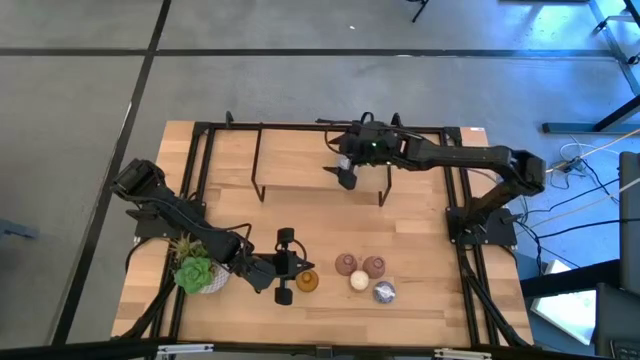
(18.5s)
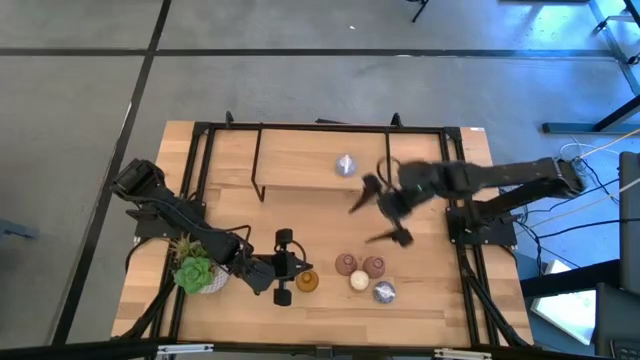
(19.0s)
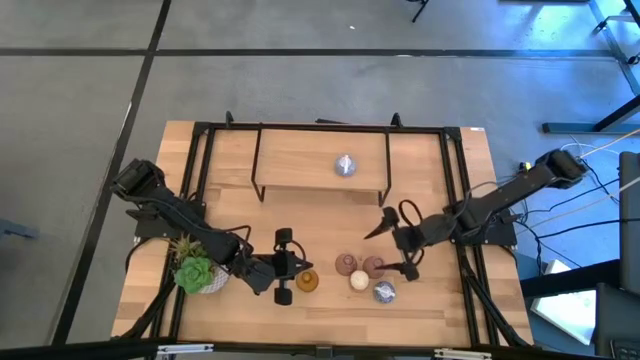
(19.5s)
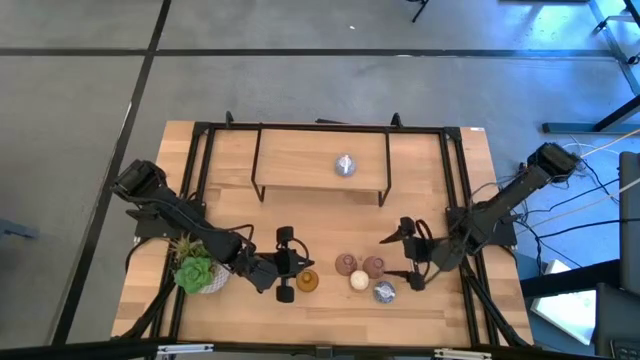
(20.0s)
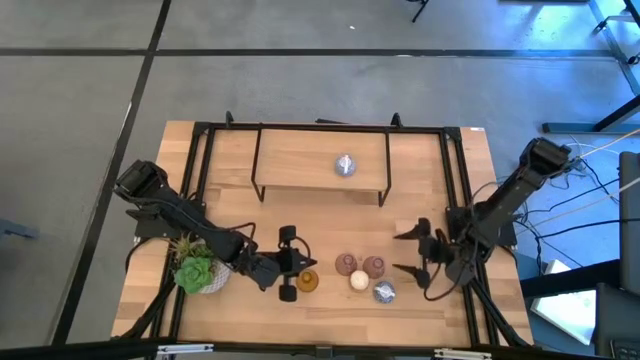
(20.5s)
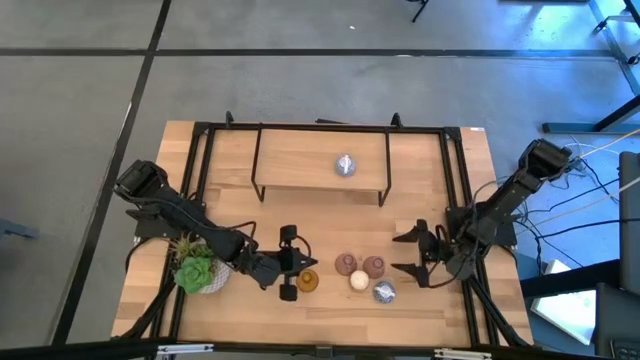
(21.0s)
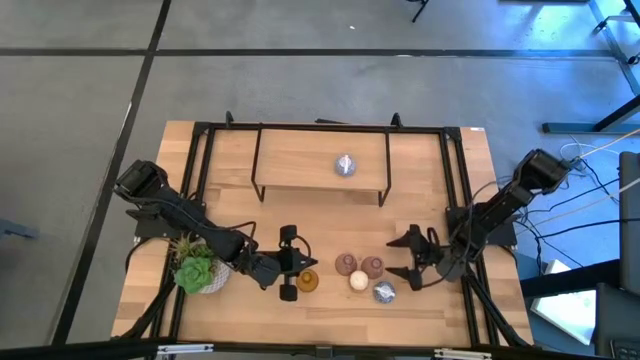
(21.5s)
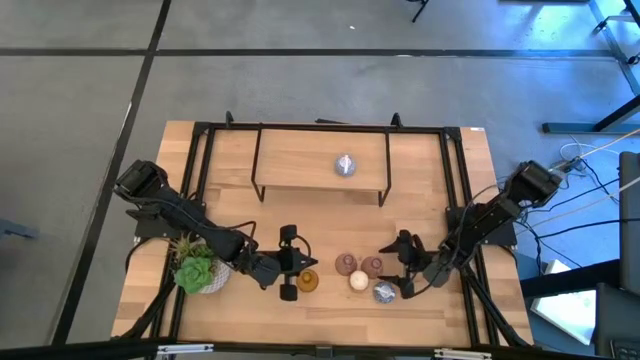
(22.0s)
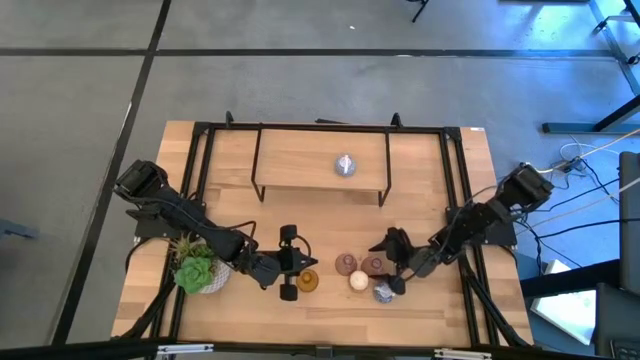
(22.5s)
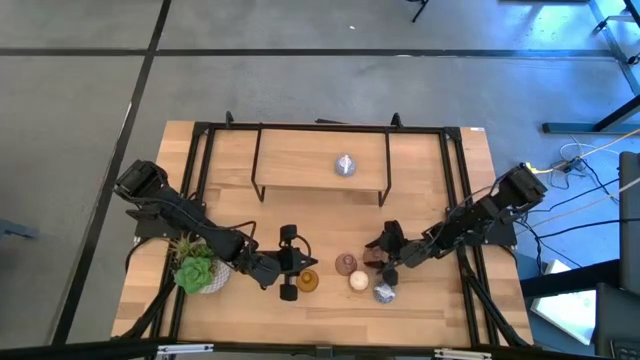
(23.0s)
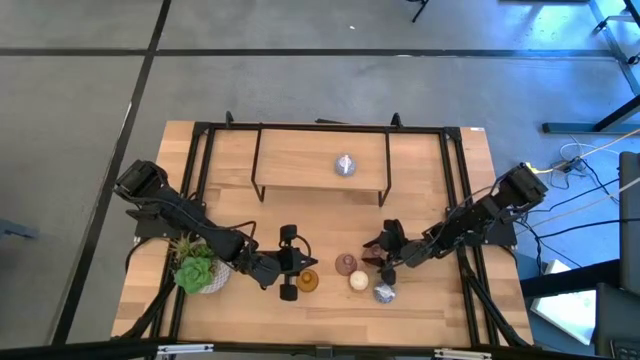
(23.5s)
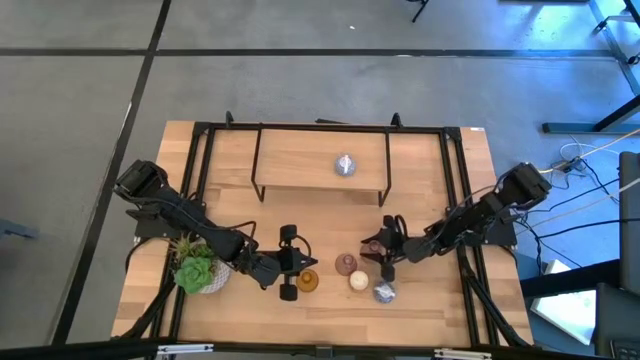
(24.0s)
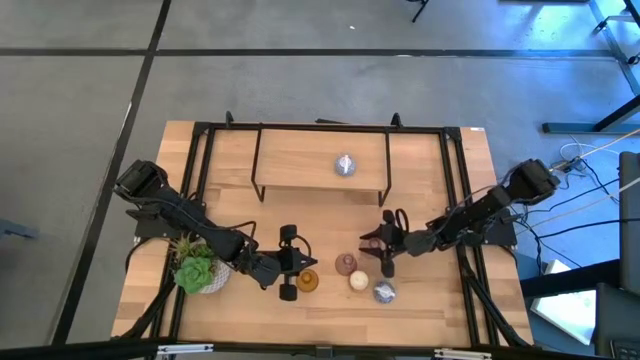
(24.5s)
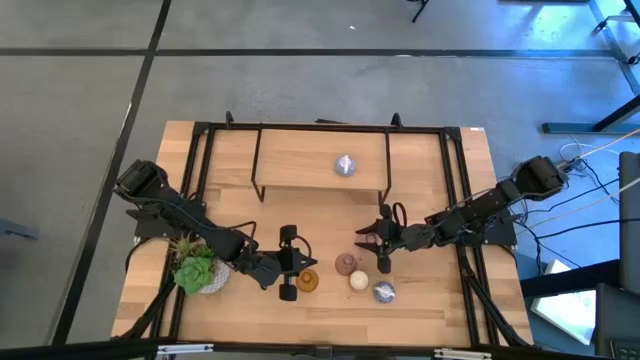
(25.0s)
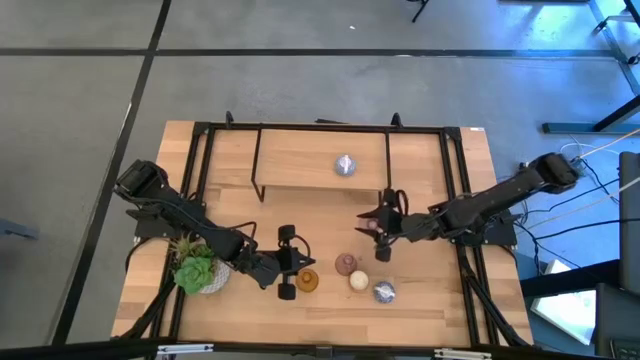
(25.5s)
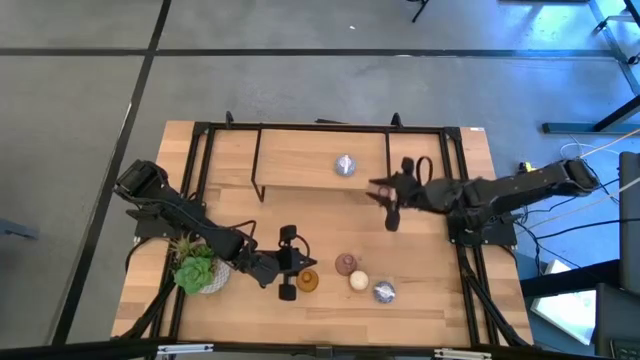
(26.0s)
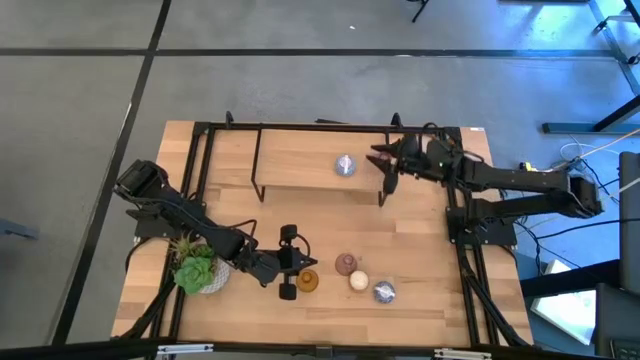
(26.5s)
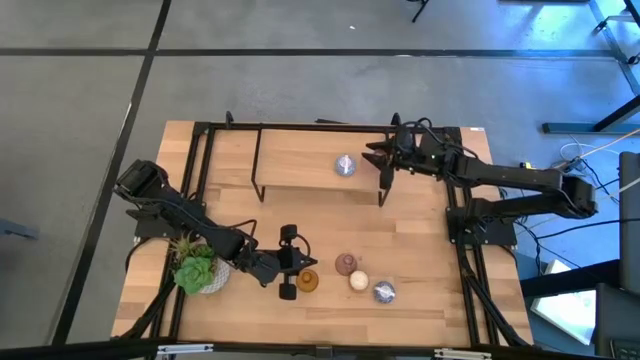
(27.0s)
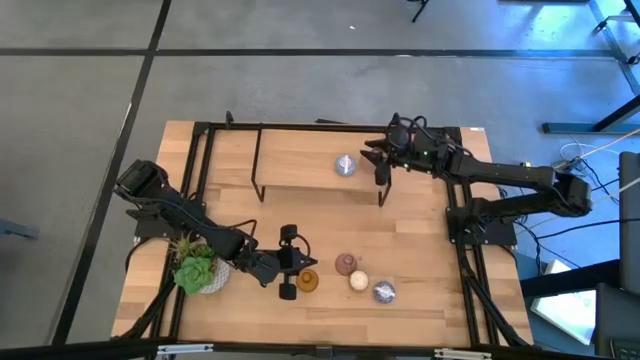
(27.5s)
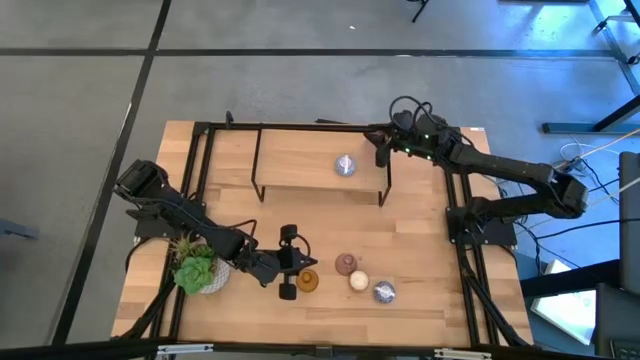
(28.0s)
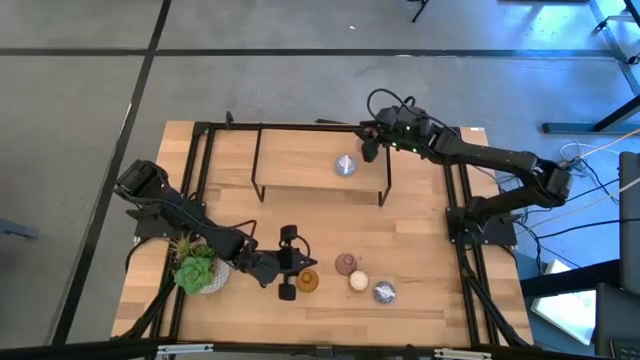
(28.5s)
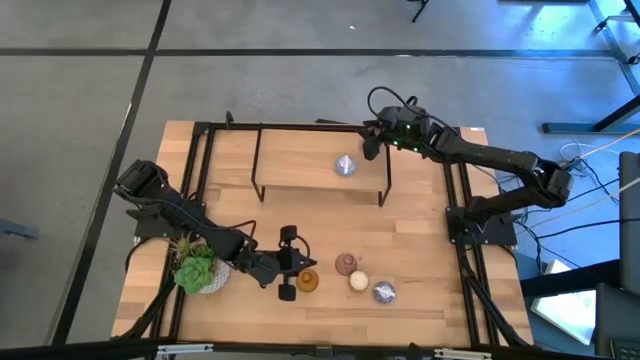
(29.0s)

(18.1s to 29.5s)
Task: Pick & Place candle stick holders
Put the right pink glass candle holder on the shelf

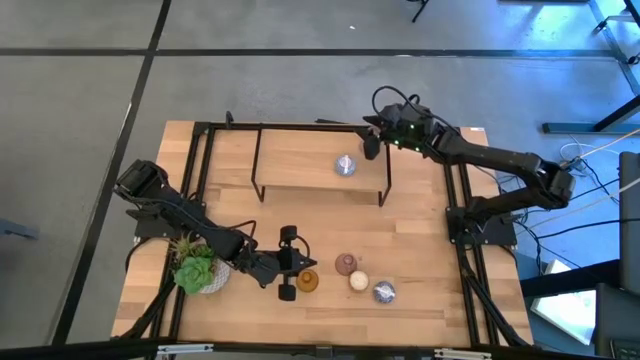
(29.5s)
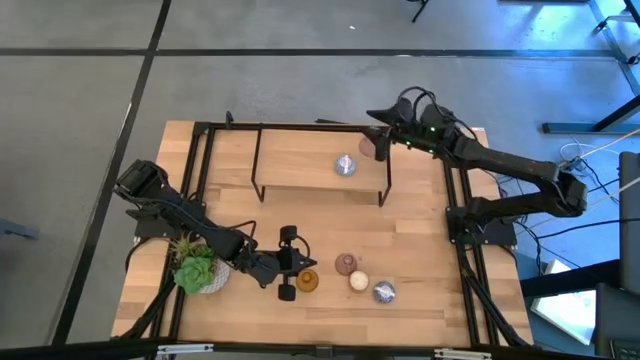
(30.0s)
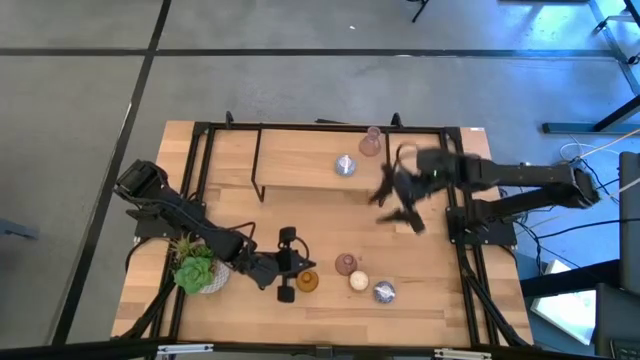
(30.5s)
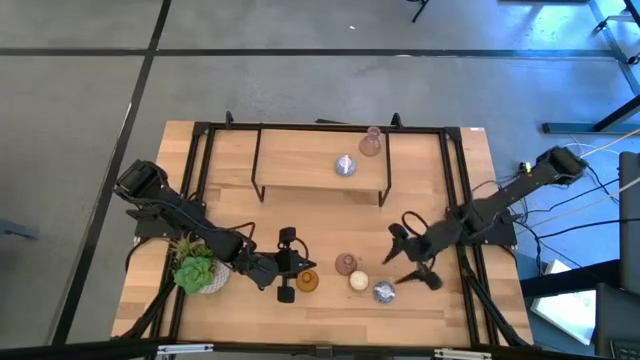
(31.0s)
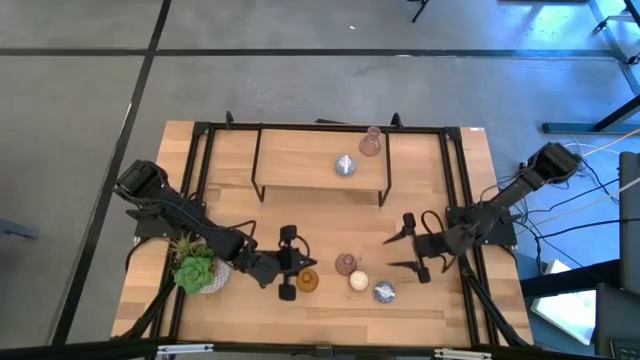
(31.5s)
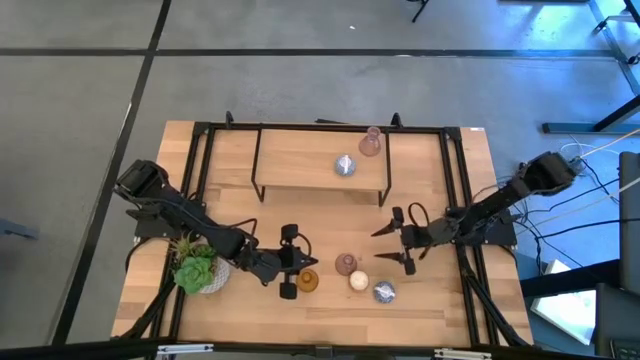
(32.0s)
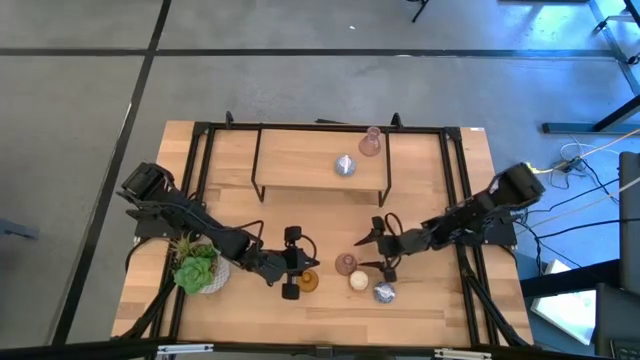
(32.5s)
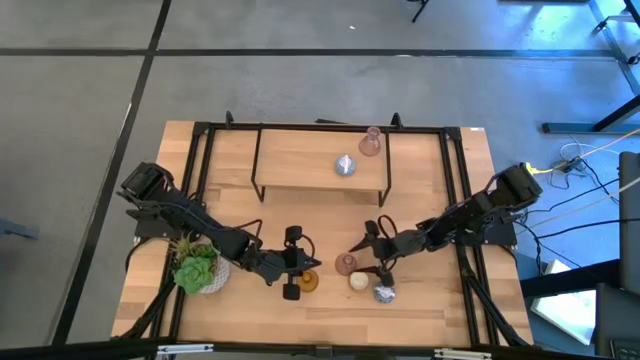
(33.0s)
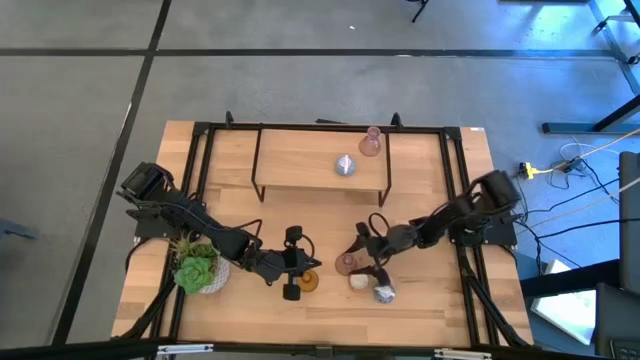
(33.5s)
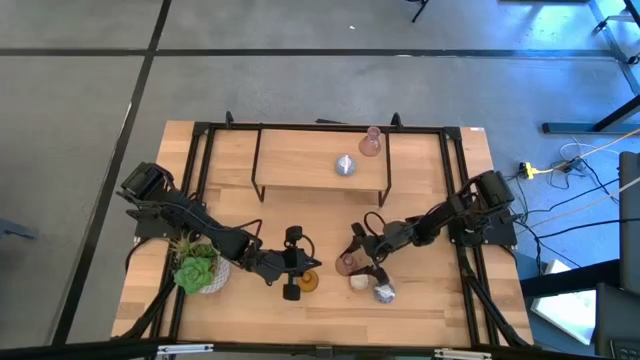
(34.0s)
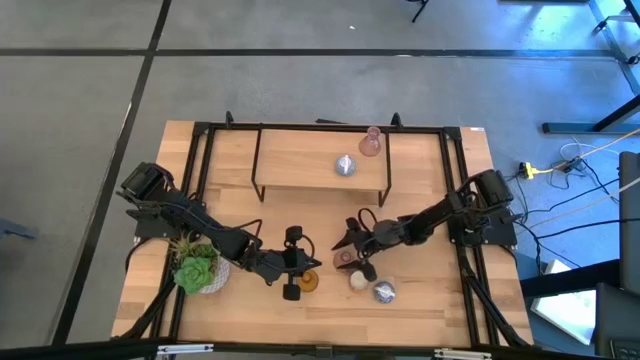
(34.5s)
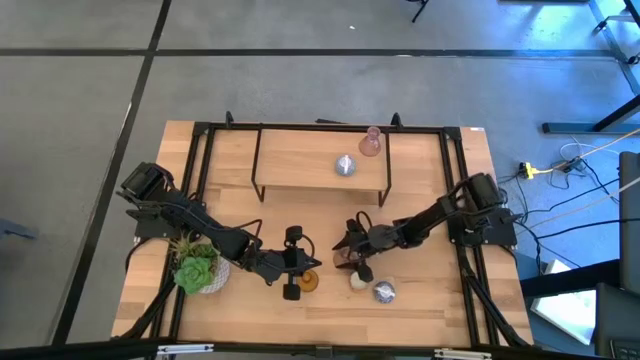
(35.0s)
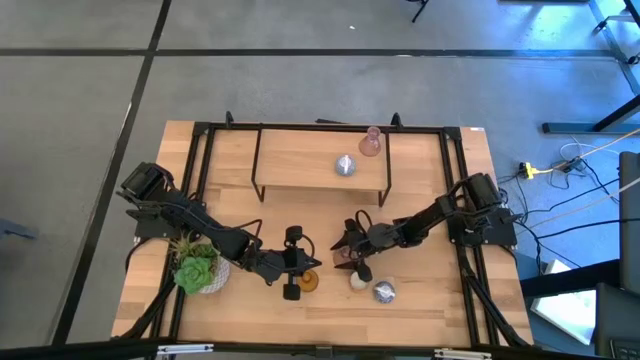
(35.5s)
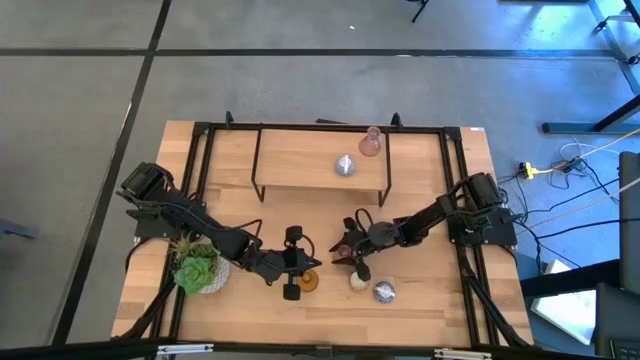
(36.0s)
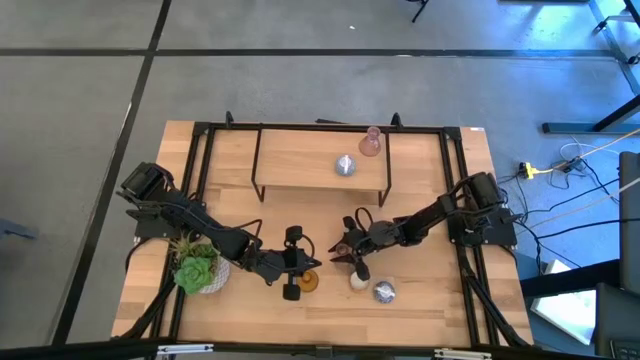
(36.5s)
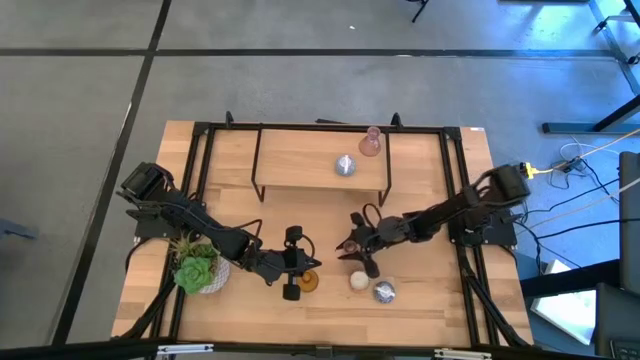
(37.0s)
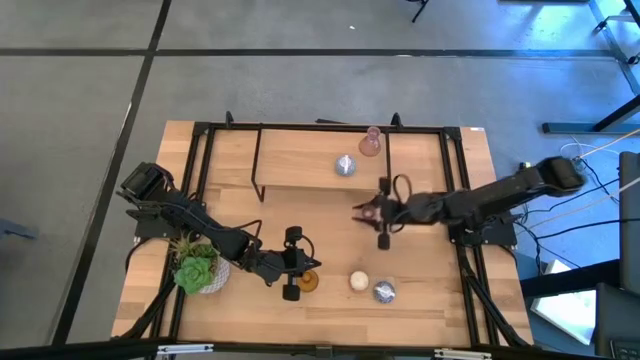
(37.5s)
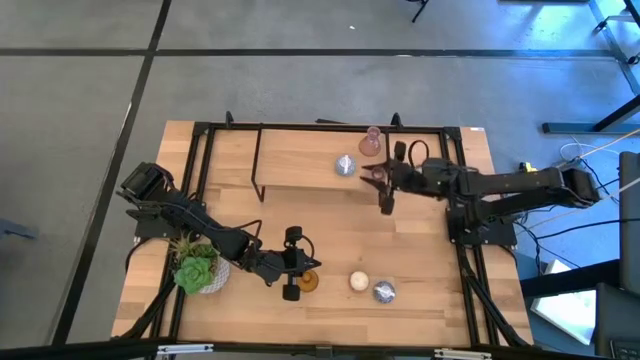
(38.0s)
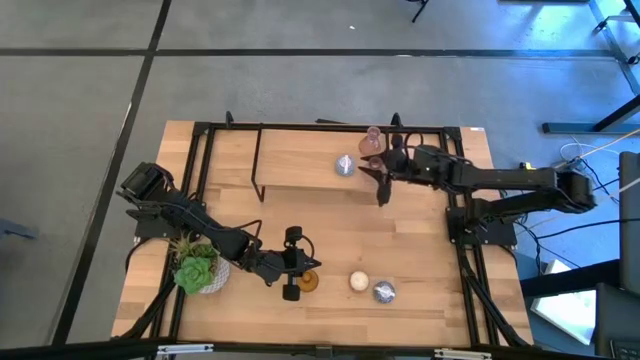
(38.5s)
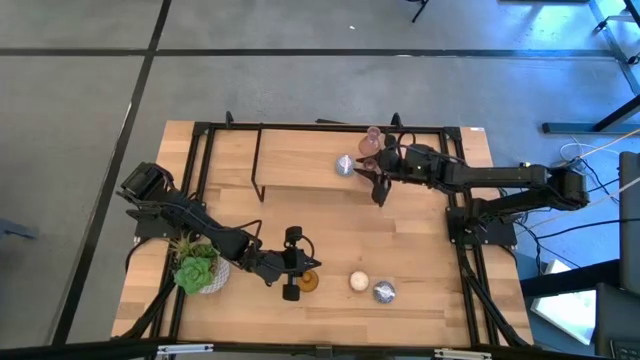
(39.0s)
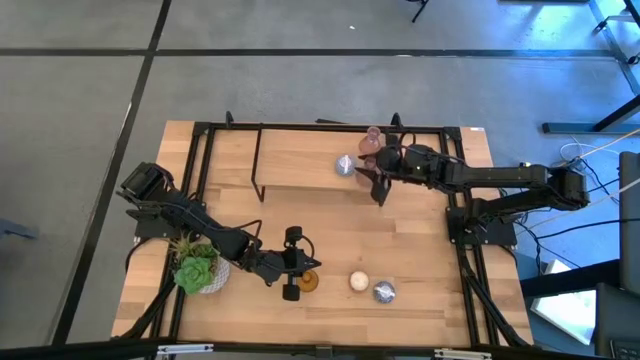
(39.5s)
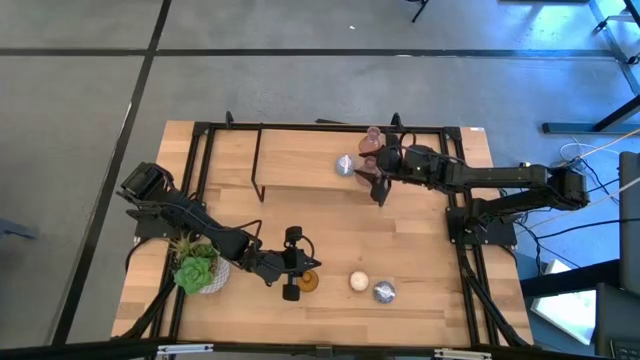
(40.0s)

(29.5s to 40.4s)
Put the pink glass candle holder on the shelf

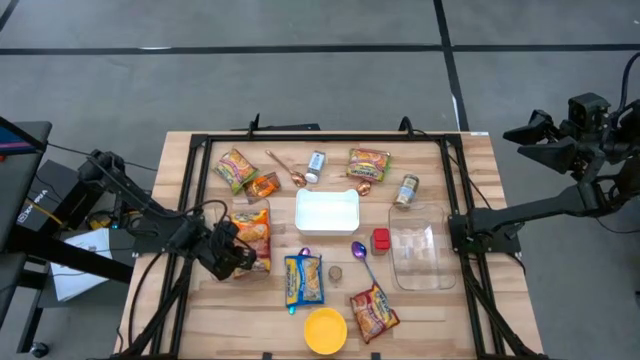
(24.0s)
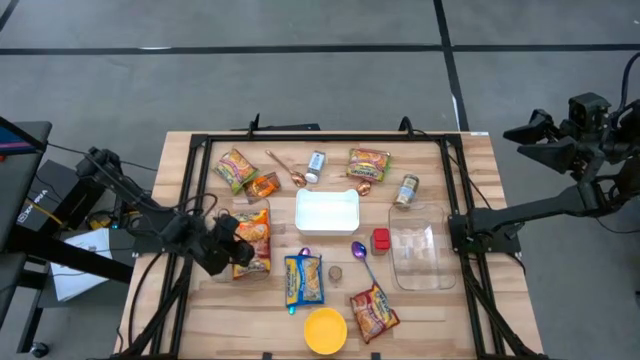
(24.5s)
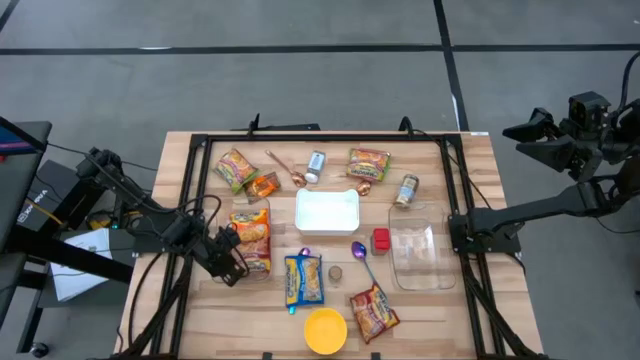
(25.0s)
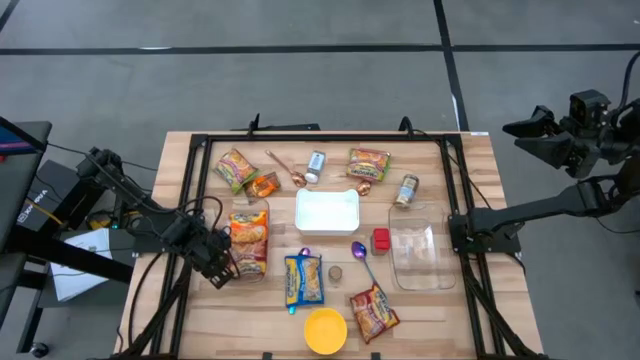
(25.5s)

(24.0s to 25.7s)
Task: Pick & Place Food Item
Adjust the left transparent bin on the table
